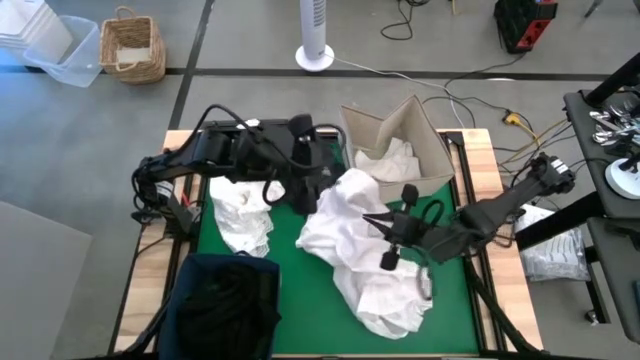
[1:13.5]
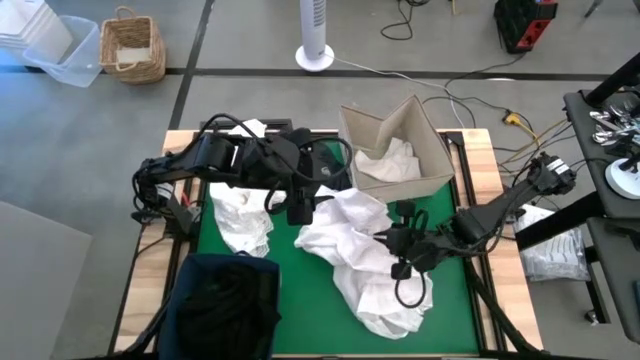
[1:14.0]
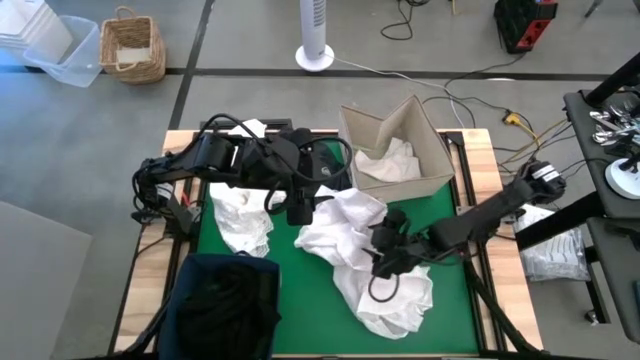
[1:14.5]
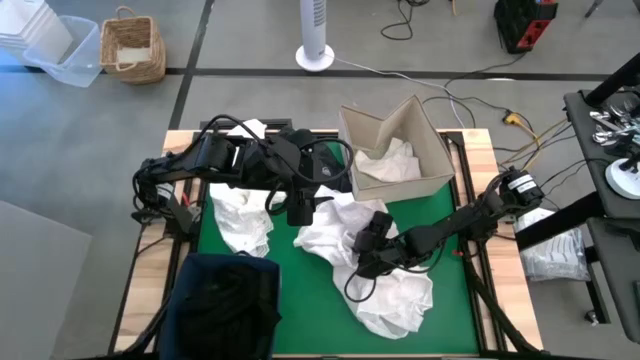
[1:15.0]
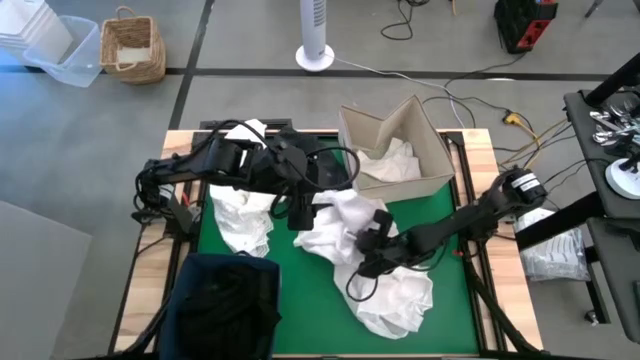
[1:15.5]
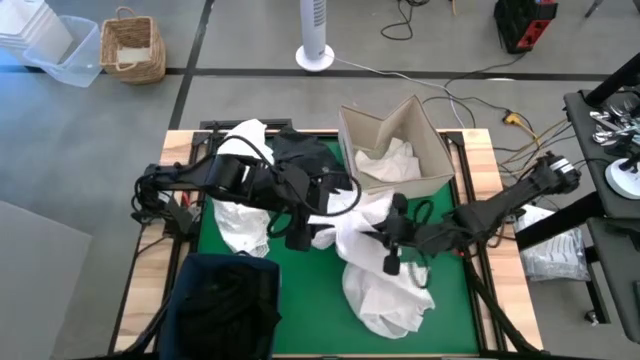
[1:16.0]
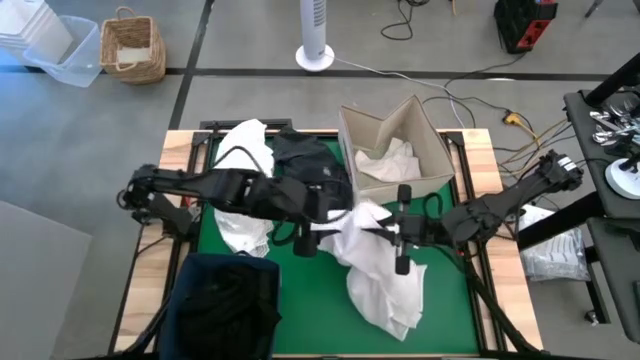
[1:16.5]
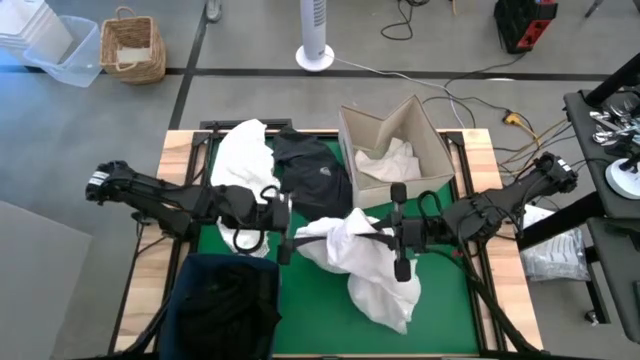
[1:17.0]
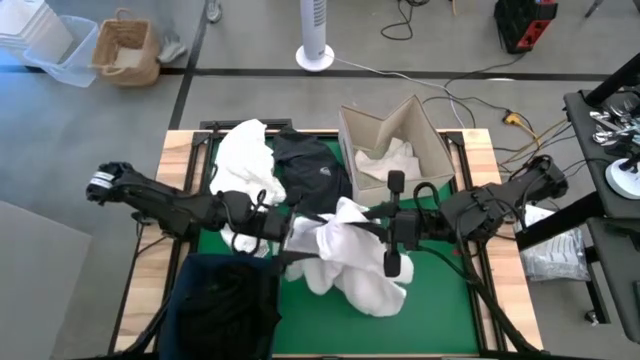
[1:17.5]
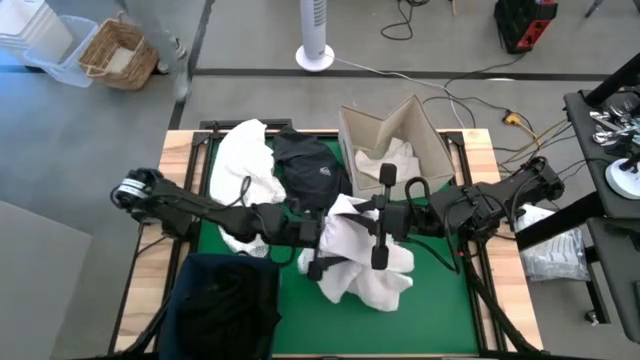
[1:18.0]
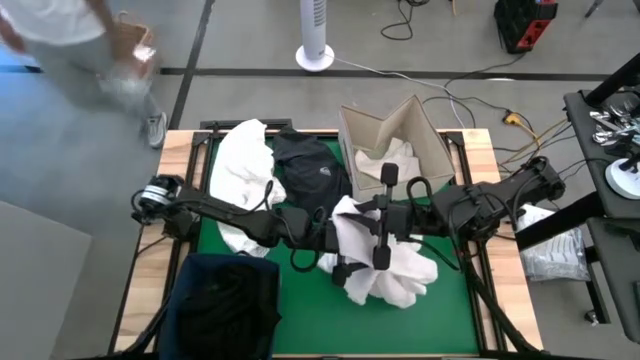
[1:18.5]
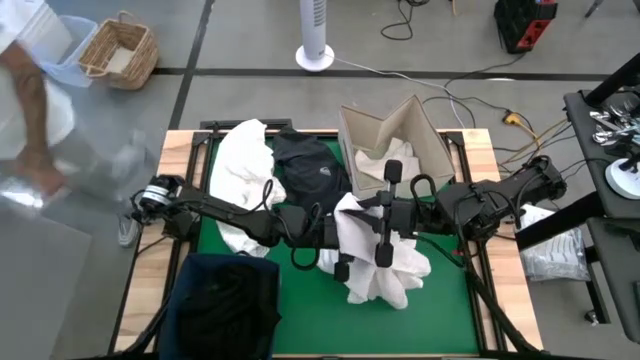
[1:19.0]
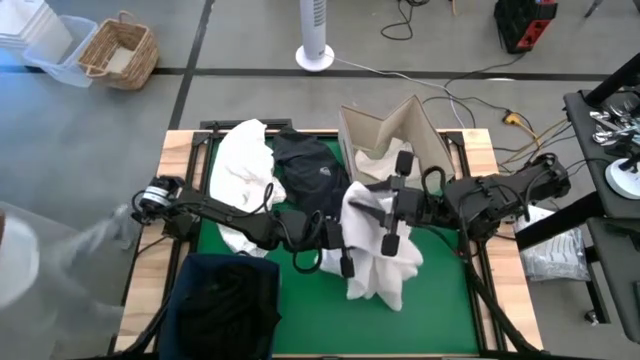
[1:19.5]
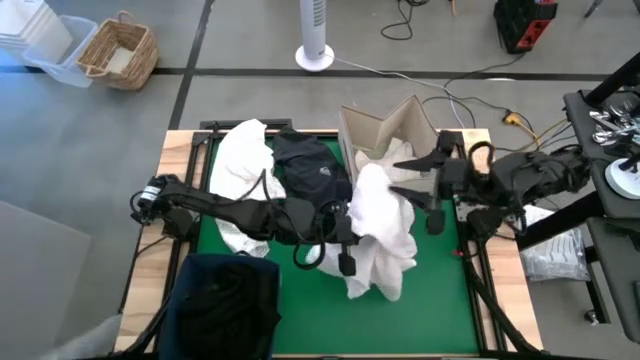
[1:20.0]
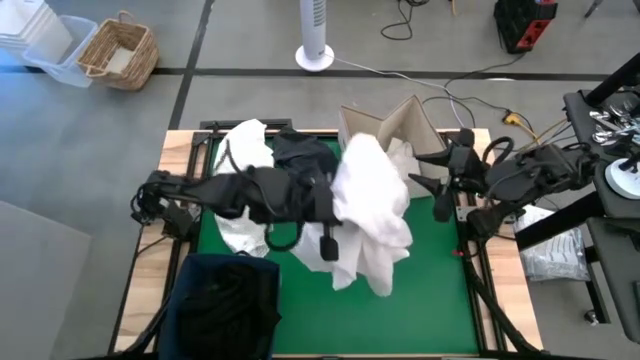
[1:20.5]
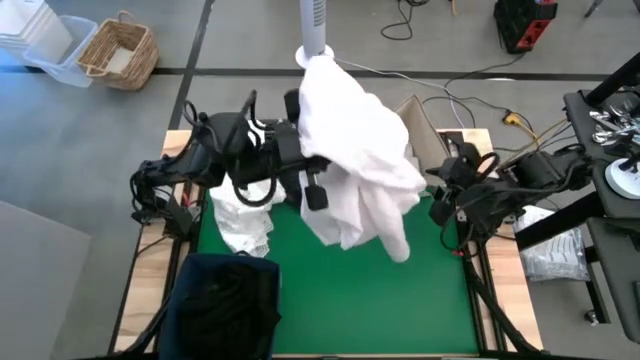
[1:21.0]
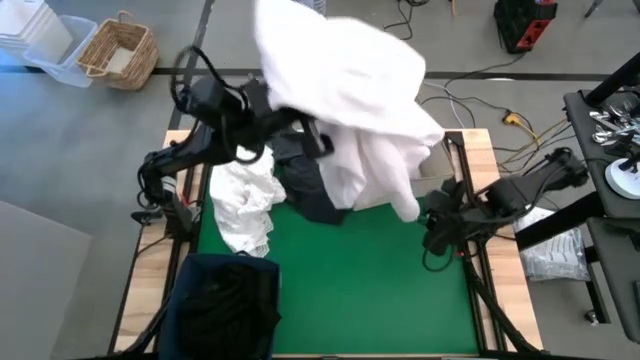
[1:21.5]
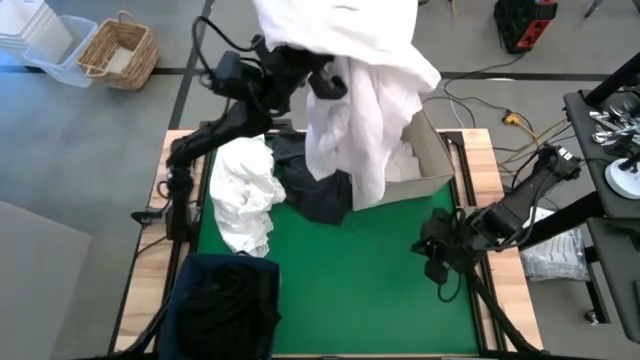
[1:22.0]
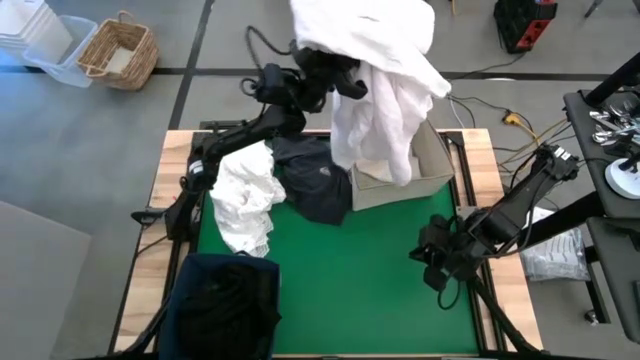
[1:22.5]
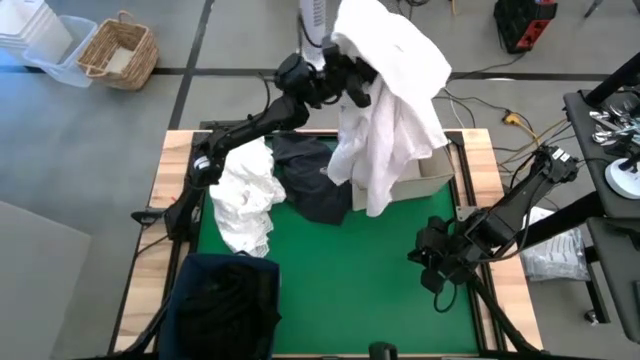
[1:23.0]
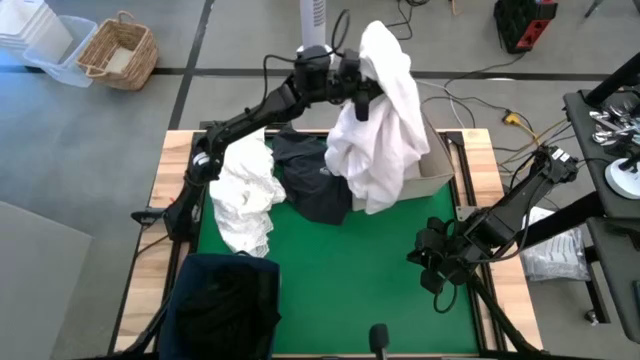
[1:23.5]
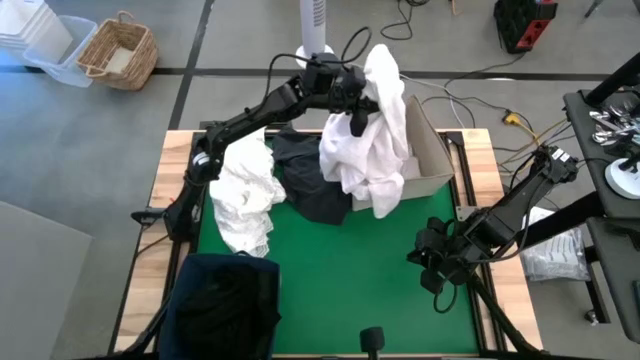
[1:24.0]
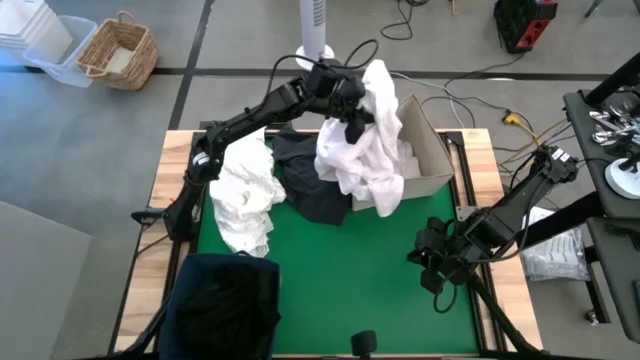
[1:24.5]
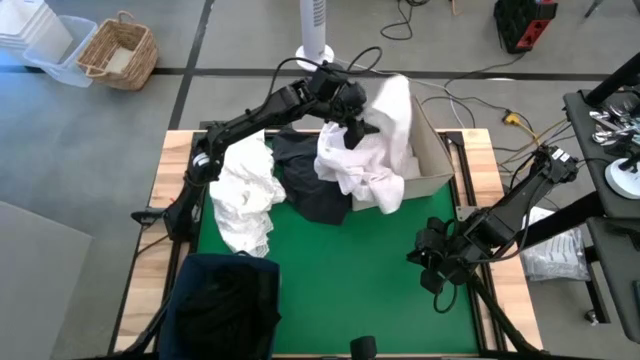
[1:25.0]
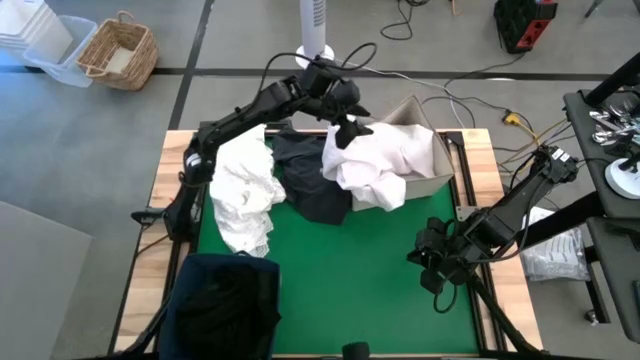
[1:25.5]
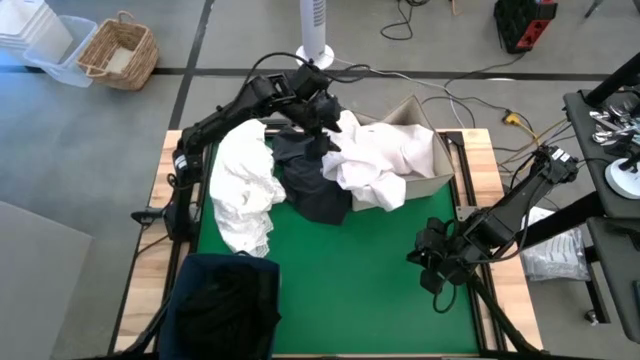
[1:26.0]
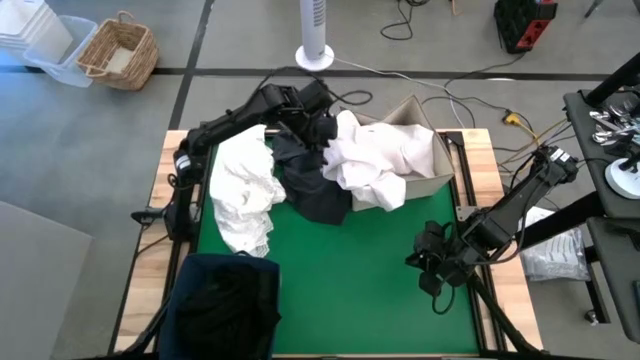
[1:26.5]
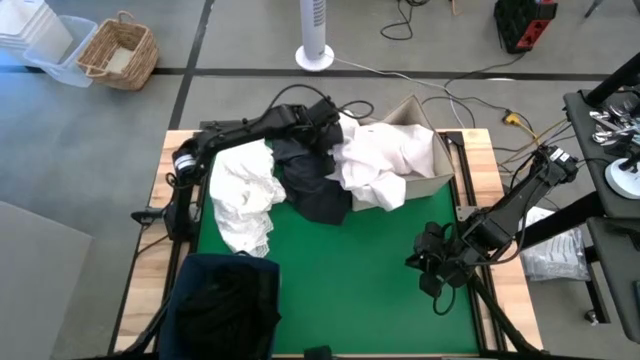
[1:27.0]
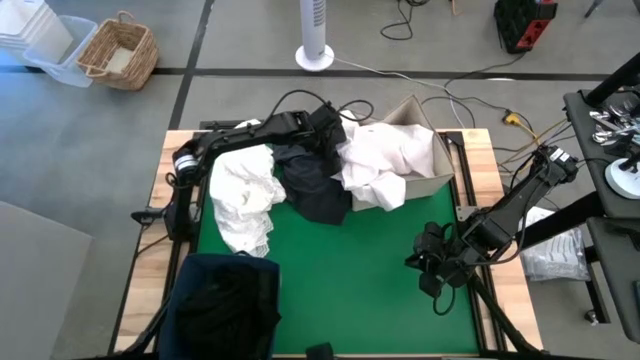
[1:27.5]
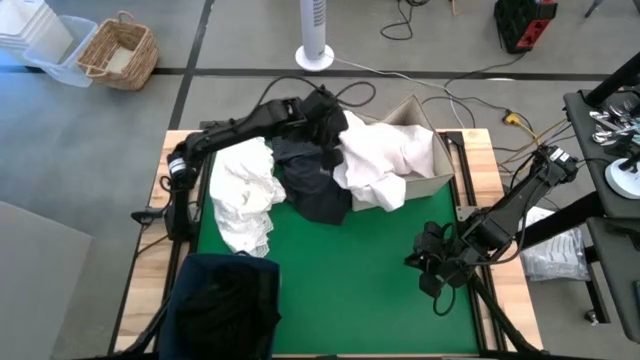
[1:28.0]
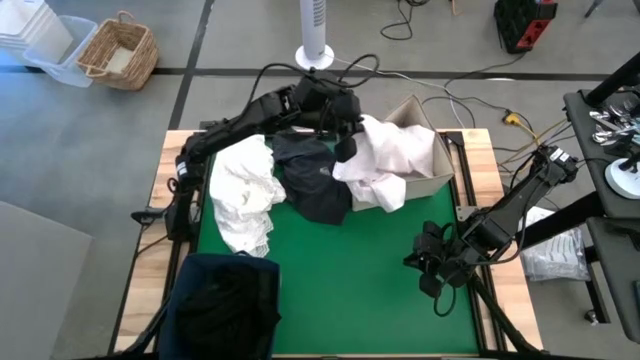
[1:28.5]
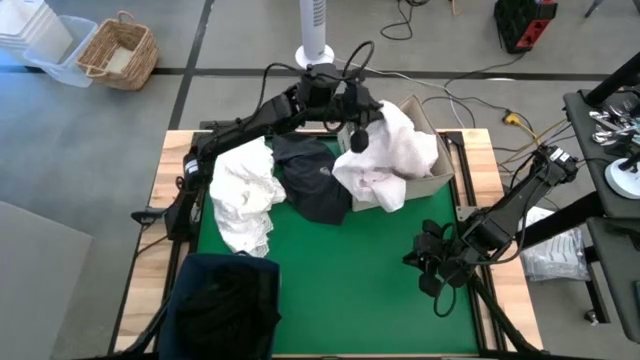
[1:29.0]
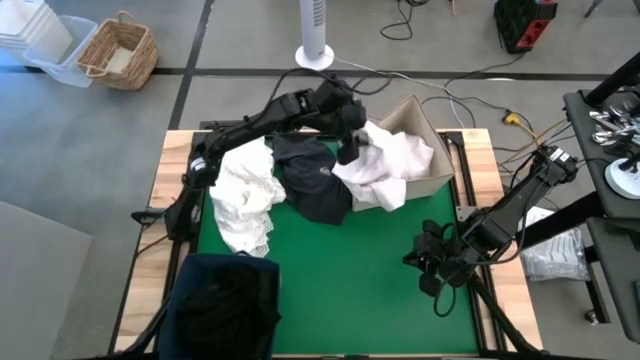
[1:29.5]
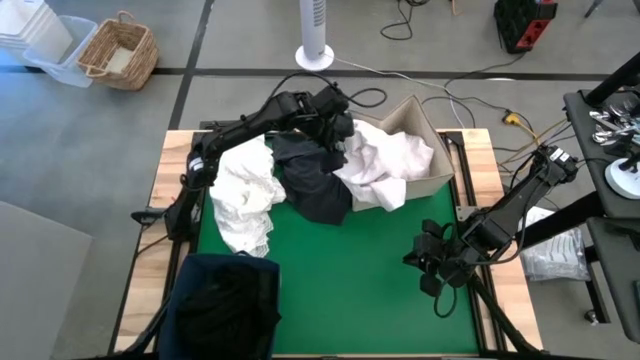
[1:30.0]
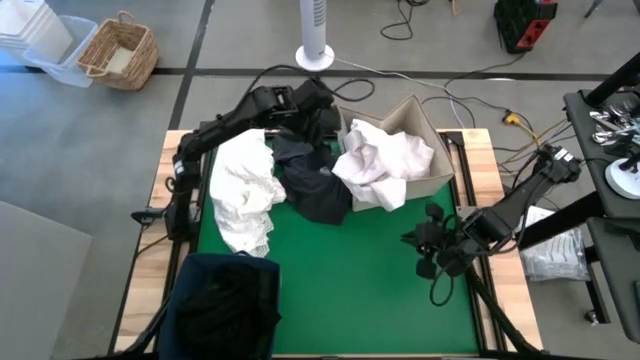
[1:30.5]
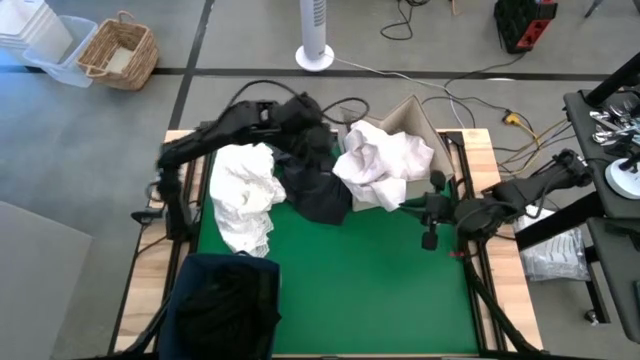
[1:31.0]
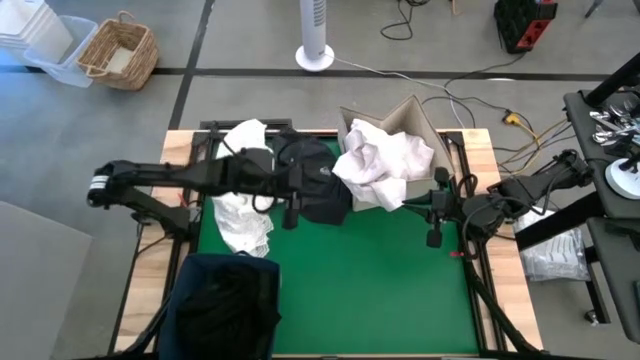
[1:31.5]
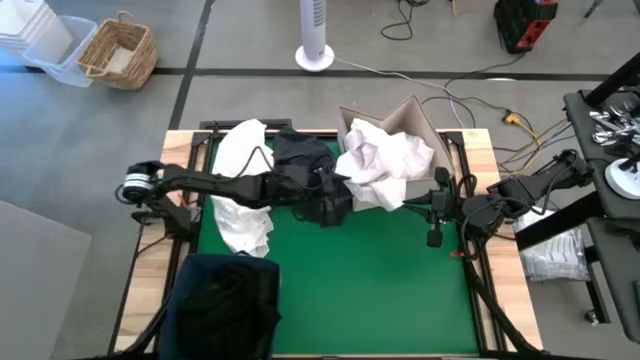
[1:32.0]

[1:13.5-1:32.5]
Put the bottom white shirt into the brown laundry organizer
